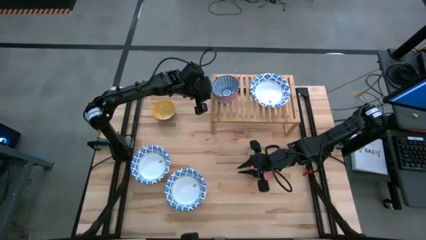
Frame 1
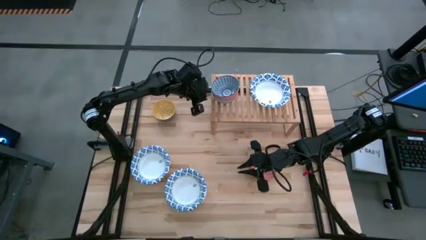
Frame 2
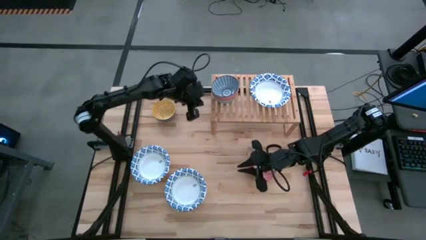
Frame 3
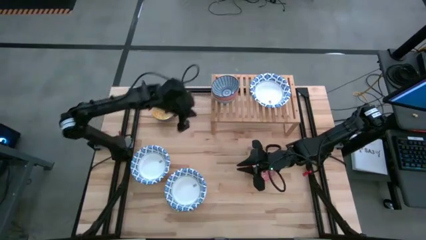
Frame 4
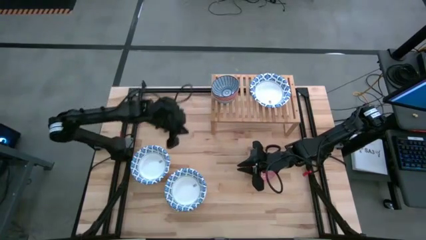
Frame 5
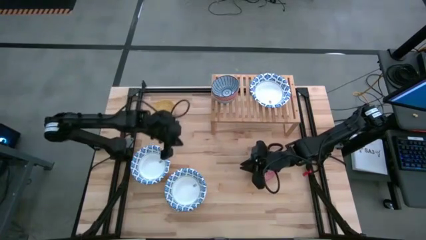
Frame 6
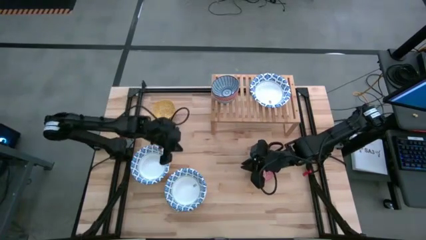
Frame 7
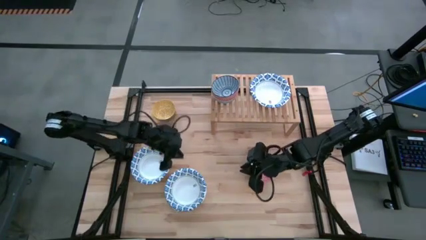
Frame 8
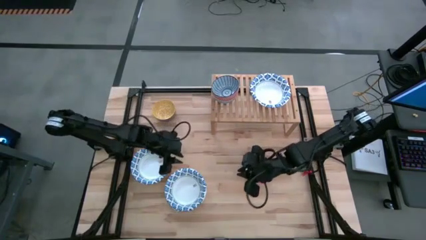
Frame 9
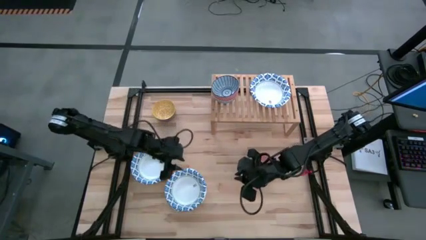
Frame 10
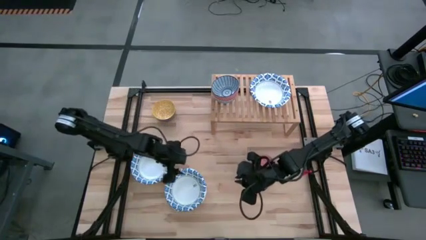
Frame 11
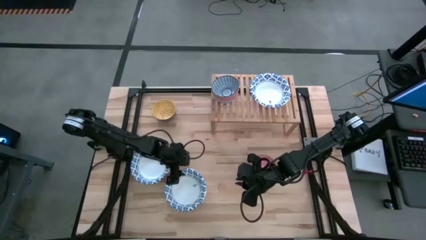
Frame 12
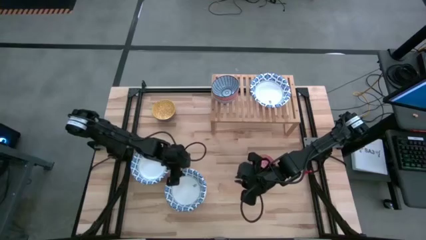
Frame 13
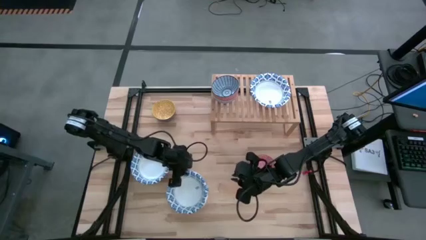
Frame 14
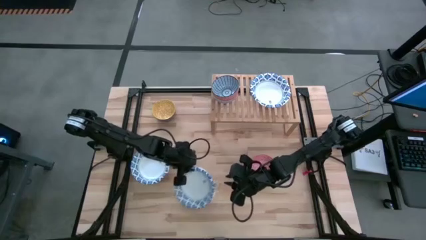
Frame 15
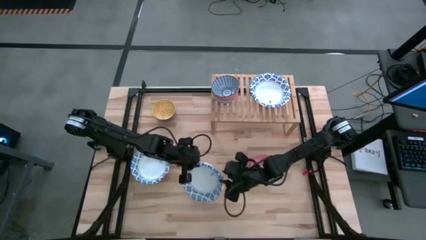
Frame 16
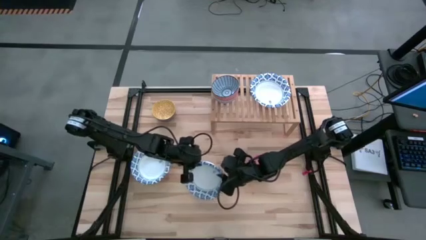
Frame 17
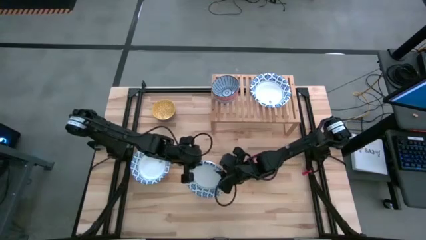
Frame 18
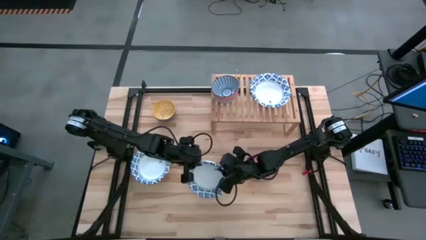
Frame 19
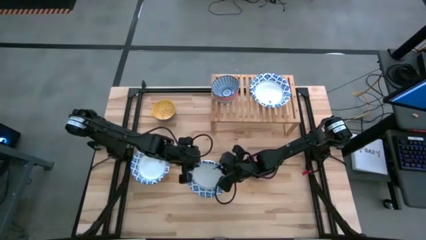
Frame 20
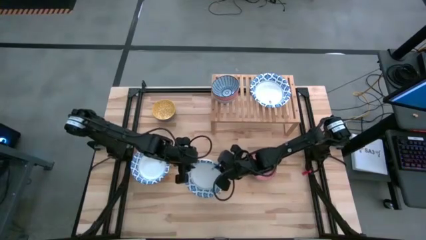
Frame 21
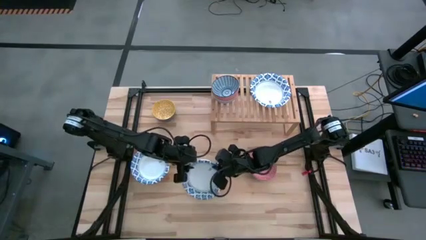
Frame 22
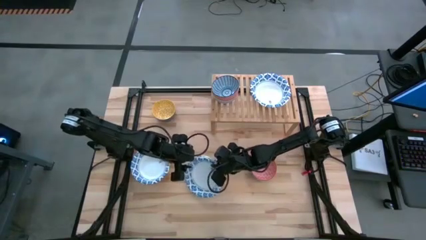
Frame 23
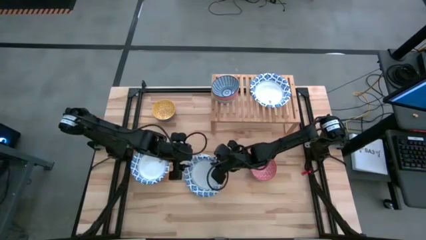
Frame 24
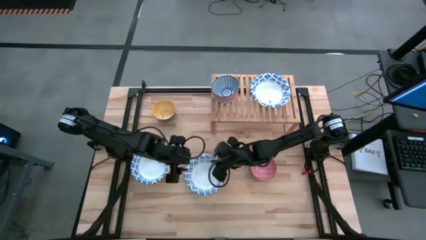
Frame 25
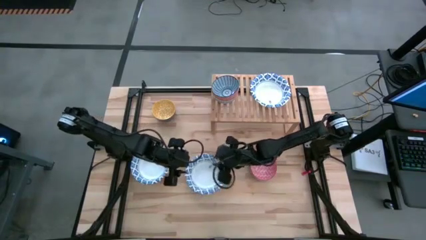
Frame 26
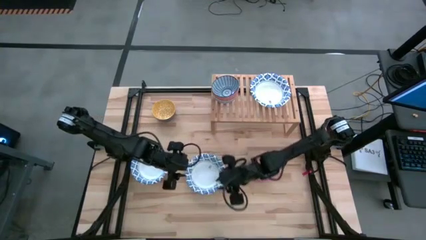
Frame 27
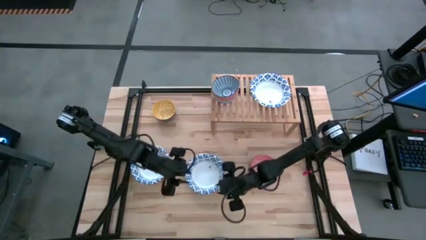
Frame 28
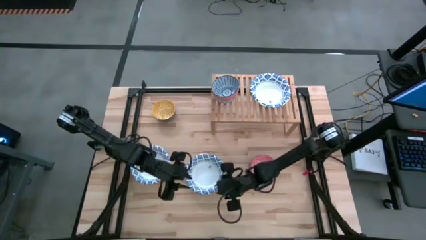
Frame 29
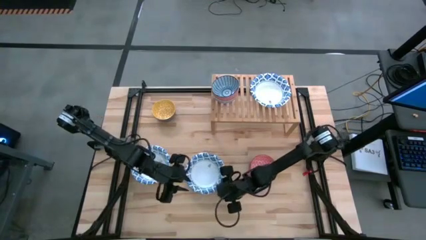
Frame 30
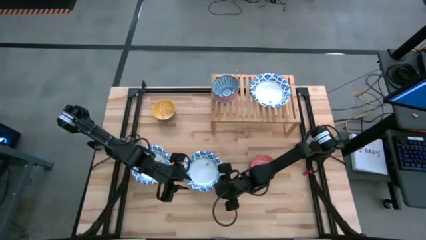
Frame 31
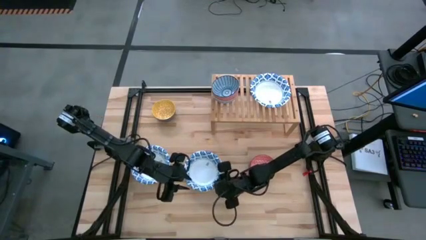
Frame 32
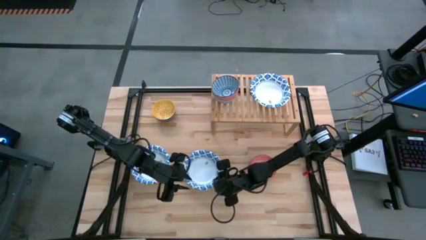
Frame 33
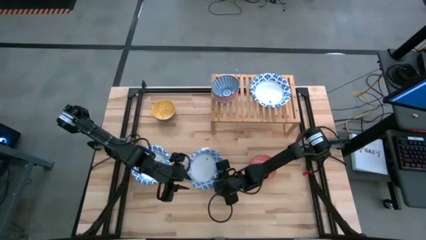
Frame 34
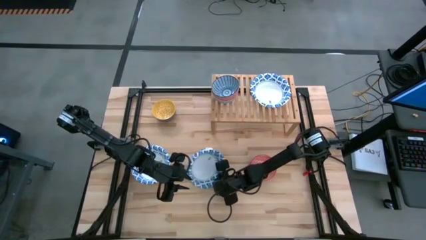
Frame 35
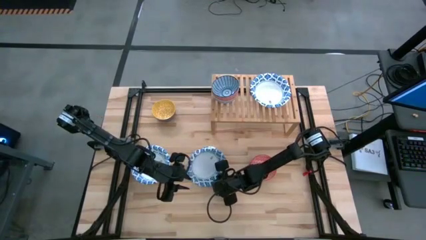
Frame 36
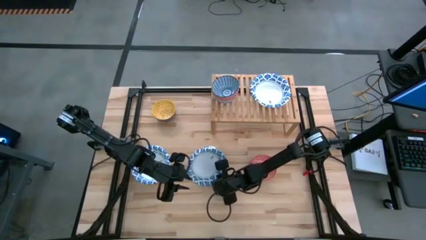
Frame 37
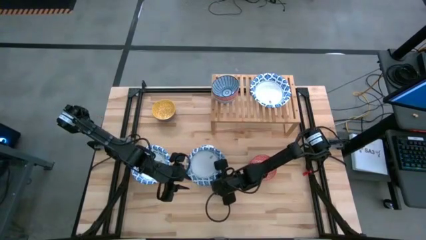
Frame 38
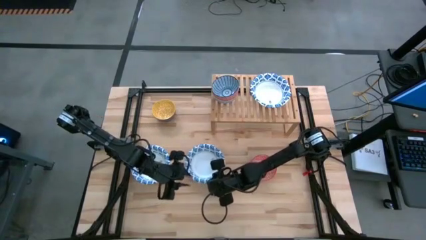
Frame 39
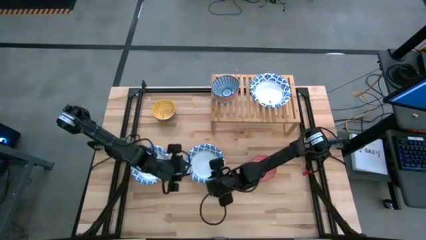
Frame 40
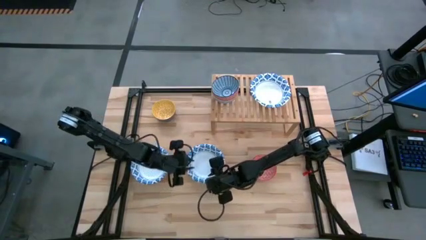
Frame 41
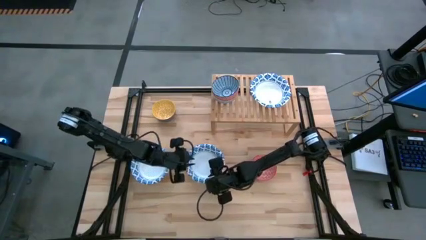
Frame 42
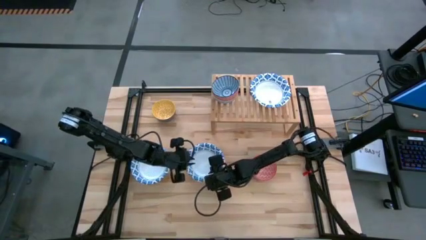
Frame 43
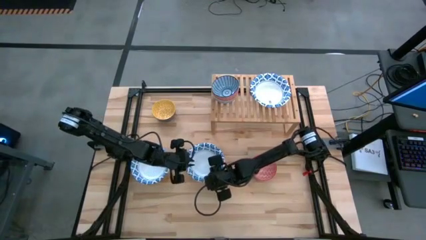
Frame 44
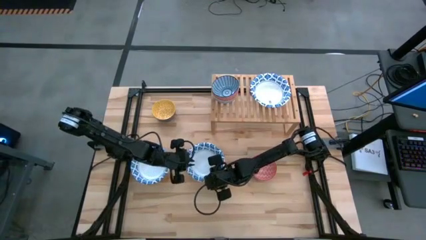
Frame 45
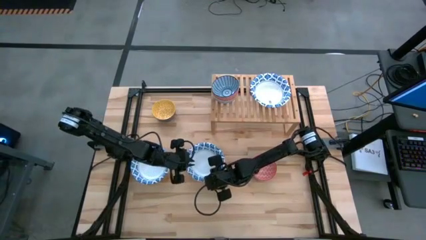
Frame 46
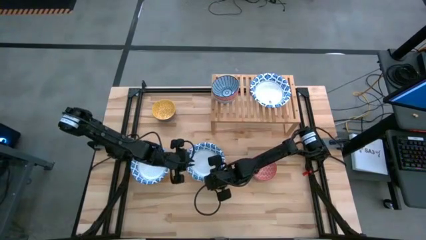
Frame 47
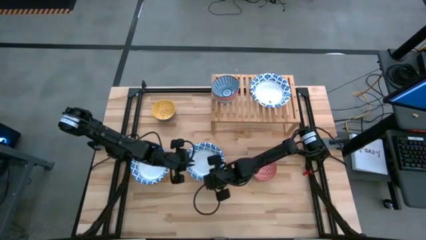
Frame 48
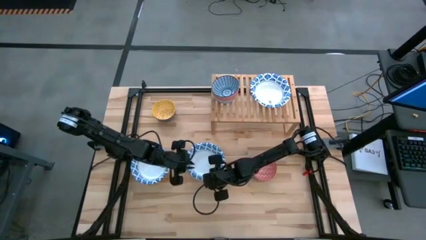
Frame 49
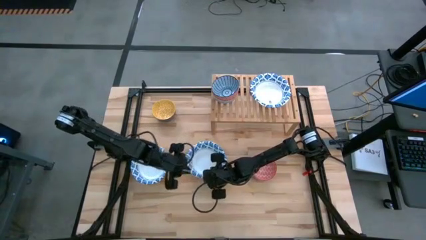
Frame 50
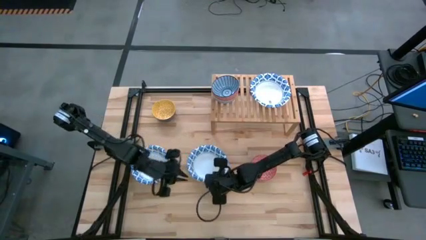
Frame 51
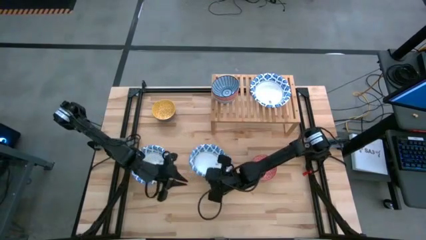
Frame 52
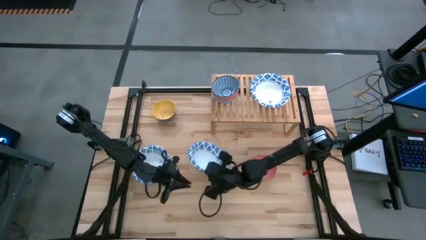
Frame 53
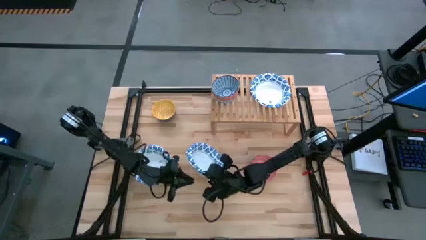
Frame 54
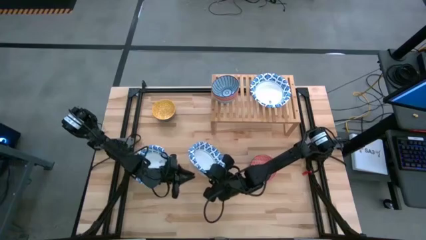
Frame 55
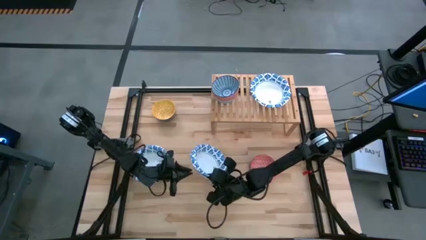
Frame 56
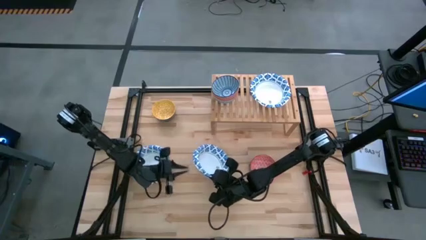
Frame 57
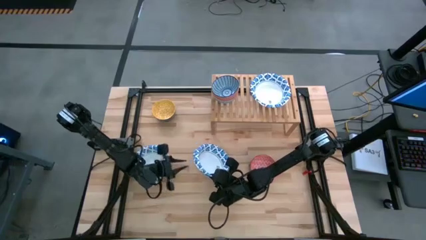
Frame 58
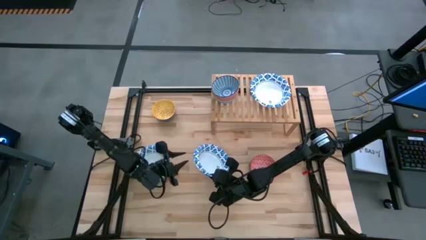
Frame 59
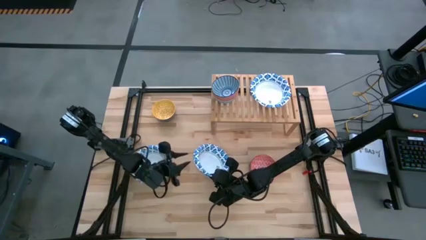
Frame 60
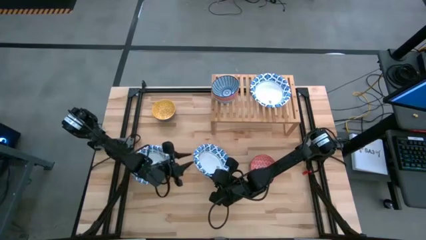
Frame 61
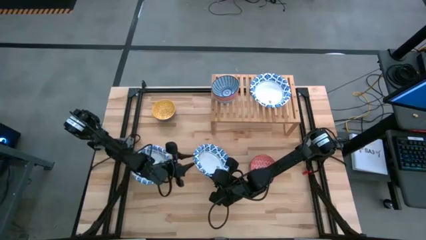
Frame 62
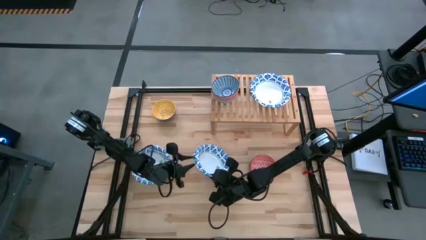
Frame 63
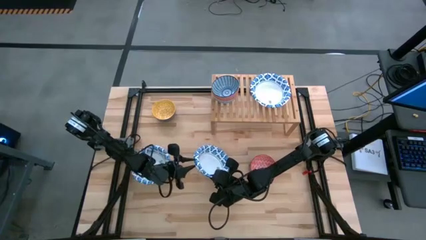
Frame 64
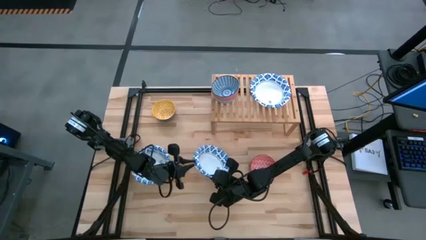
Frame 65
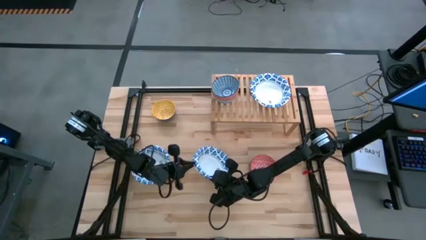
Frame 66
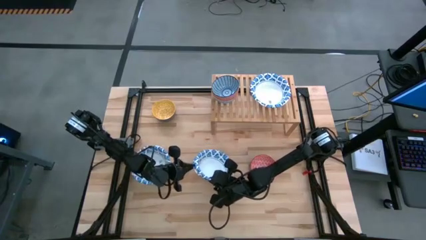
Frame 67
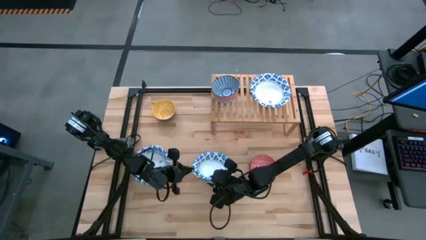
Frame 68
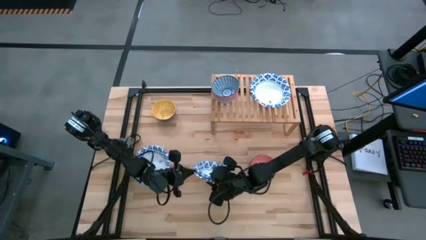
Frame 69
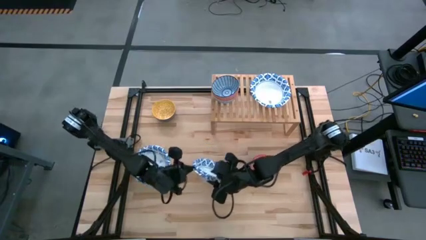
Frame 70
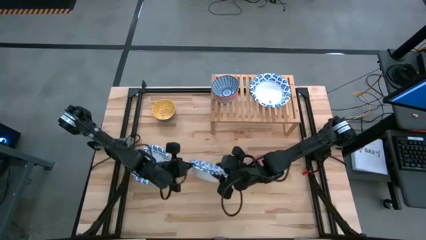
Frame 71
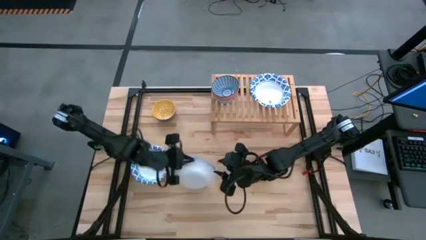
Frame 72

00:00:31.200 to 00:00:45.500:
Task: Place and stack bowls onto a shelf
Stack the white patterned bowl on top of the white patterned bowl on the shelf

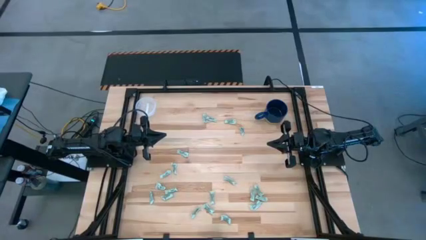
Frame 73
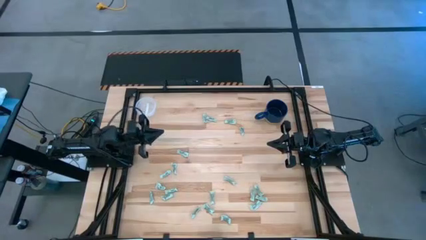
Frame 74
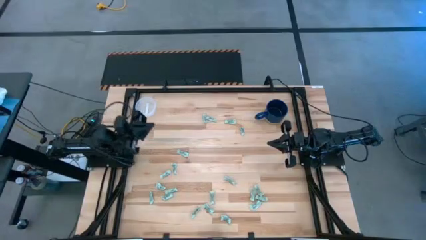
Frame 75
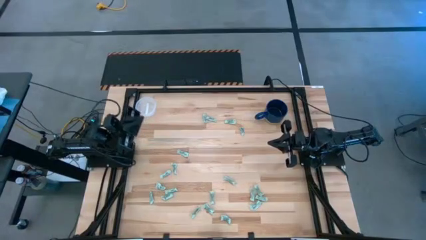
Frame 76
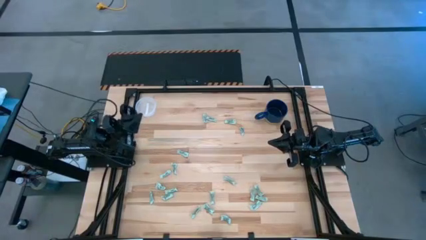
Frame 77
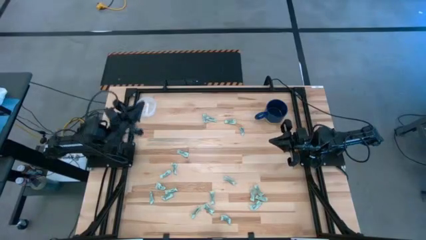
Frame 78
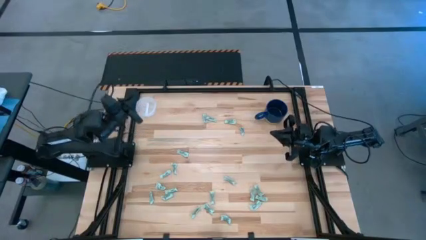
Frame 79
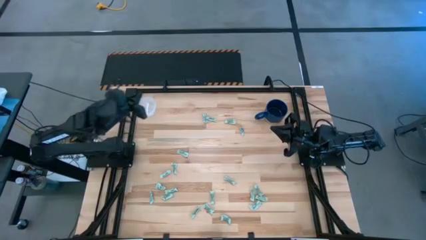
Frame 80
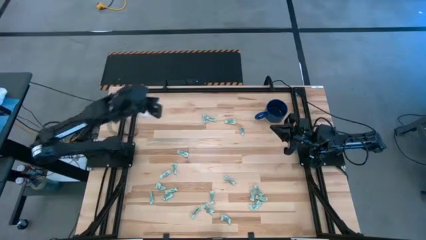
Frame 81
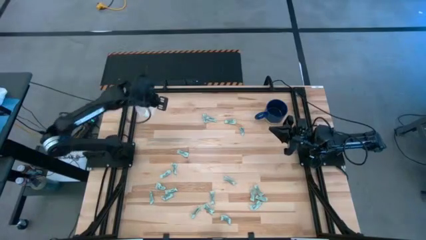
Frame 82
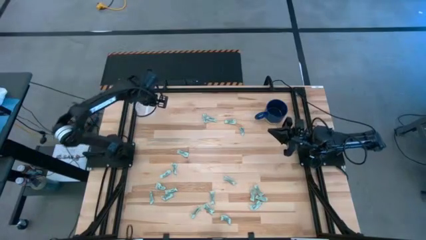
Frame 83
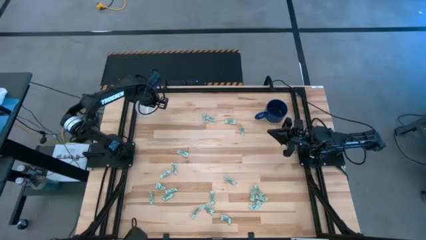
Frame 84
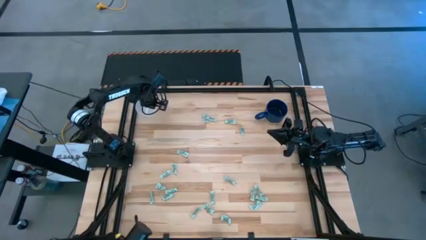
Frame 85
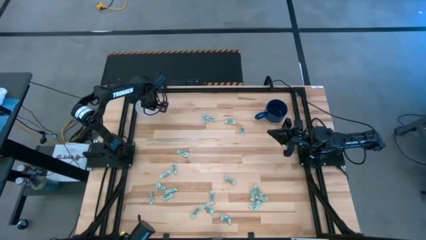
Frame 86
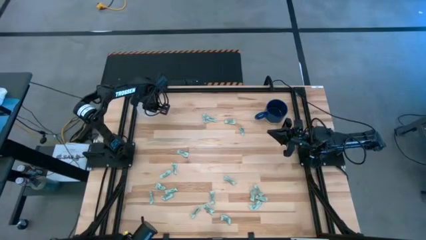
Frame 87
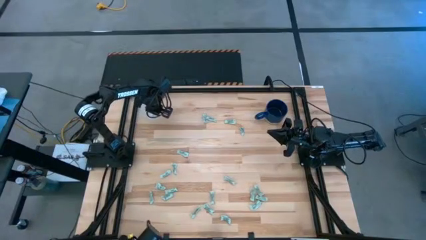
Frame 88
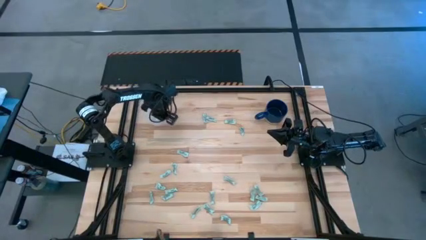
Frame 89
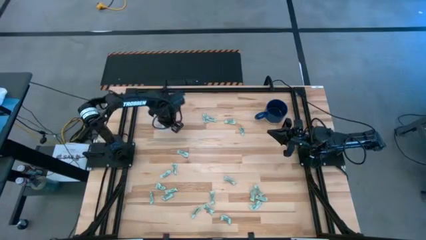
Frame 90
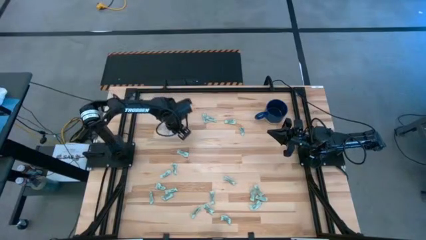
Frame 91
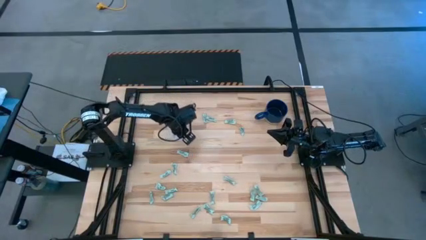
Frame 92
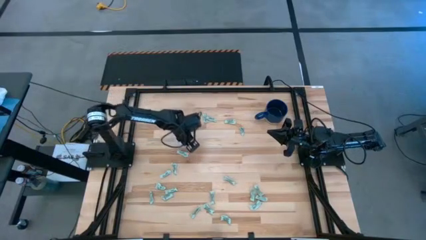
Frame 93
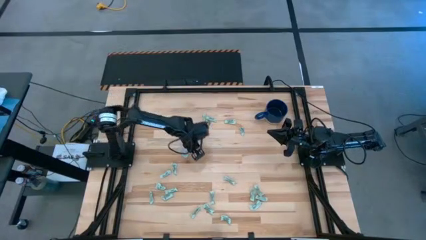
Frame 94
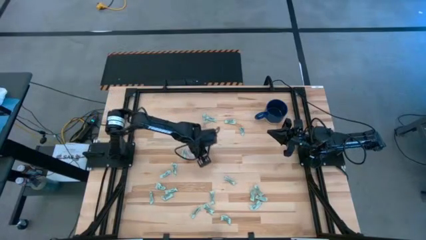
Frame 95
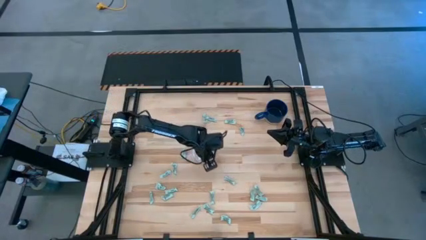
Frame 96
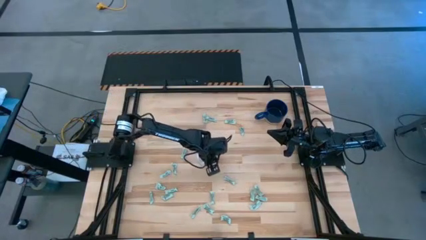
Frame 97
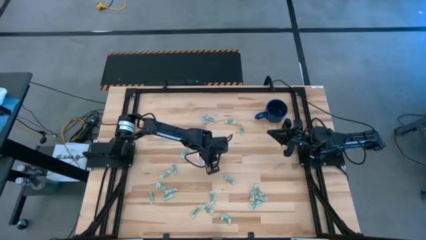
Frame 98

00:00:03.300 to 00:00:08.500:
Task: Pick and place items into bin
Prepare the transparent bin to put the stevia packets into it
